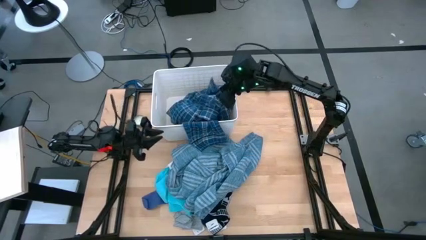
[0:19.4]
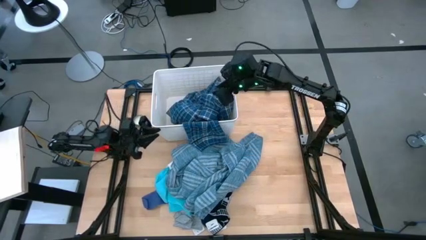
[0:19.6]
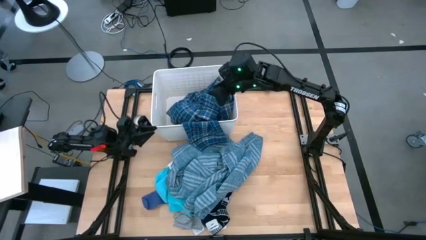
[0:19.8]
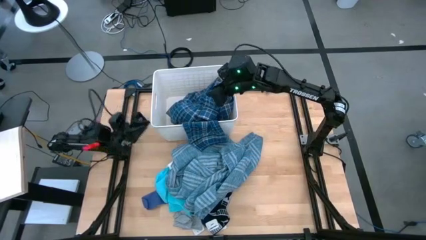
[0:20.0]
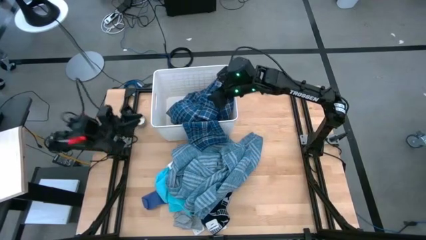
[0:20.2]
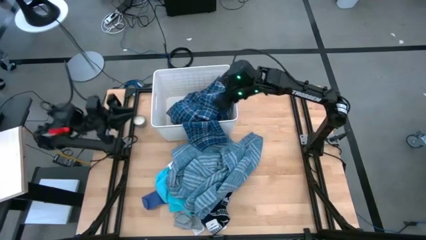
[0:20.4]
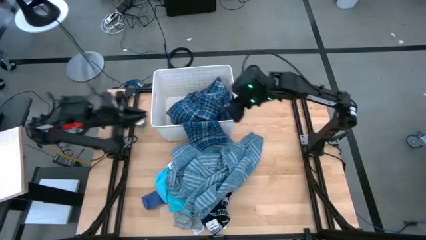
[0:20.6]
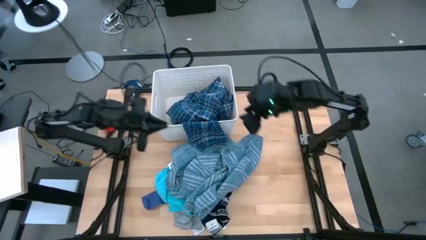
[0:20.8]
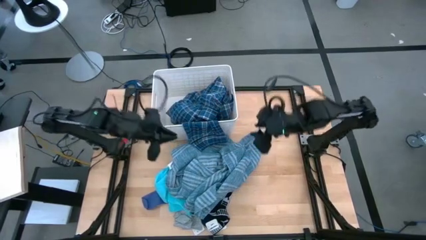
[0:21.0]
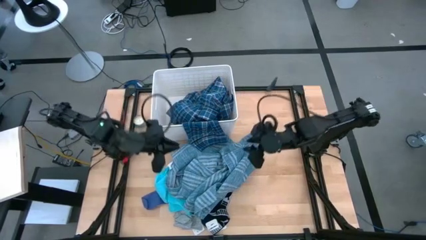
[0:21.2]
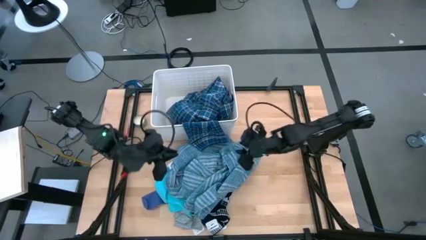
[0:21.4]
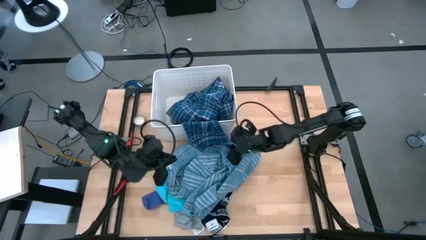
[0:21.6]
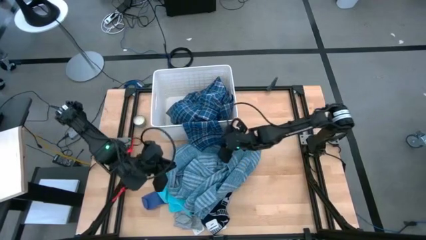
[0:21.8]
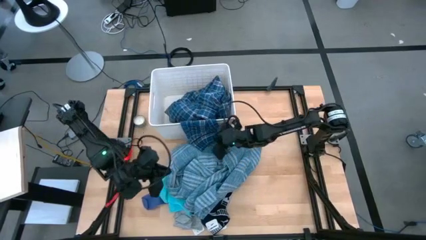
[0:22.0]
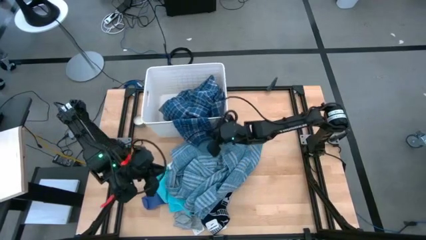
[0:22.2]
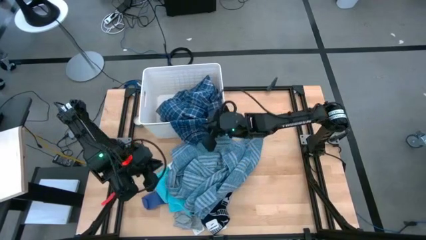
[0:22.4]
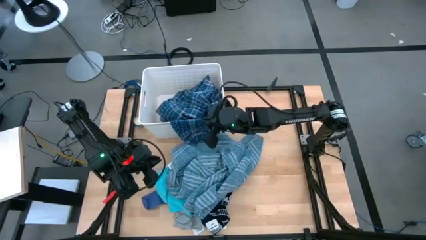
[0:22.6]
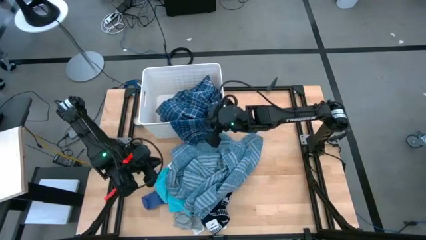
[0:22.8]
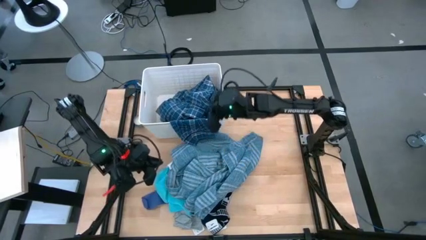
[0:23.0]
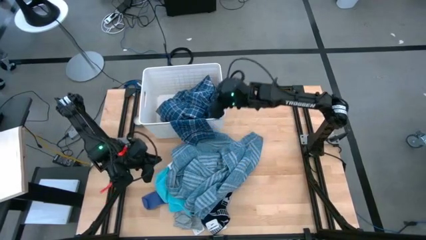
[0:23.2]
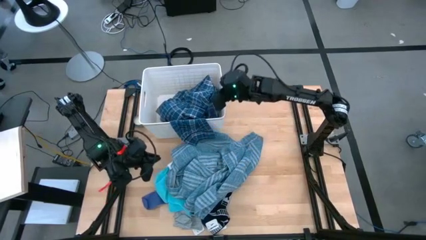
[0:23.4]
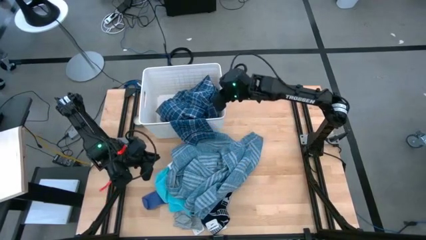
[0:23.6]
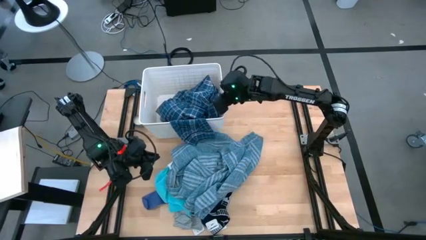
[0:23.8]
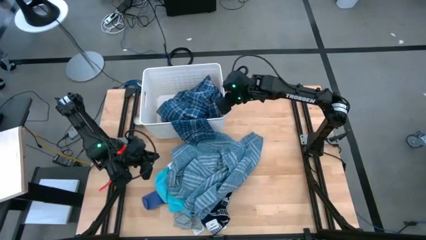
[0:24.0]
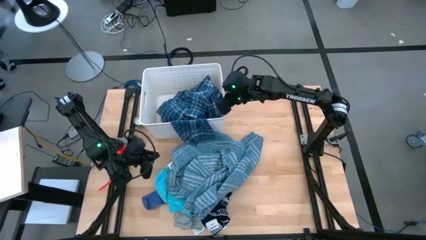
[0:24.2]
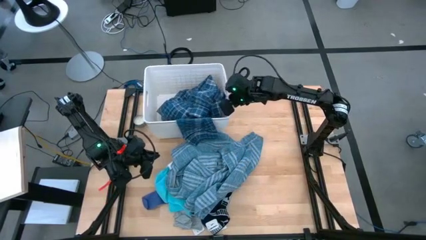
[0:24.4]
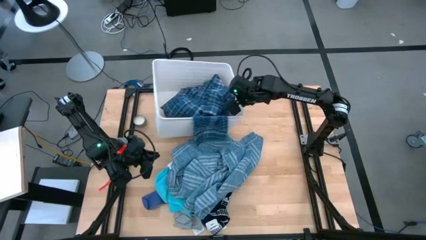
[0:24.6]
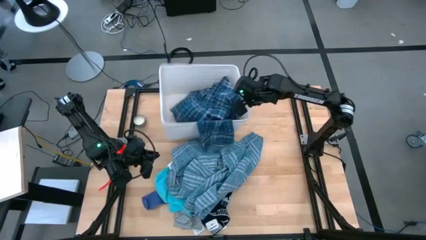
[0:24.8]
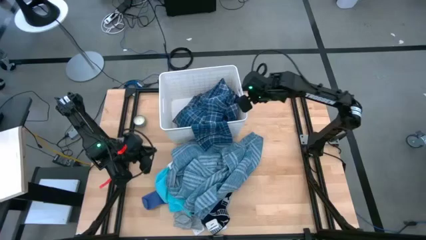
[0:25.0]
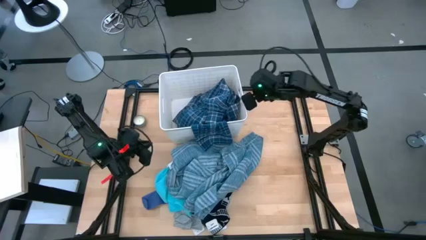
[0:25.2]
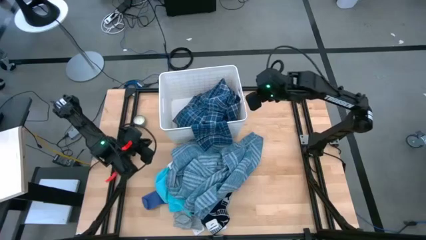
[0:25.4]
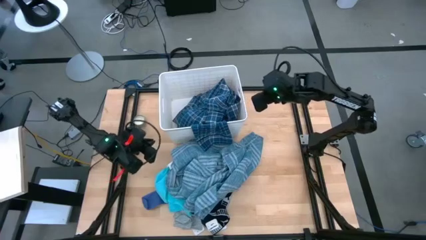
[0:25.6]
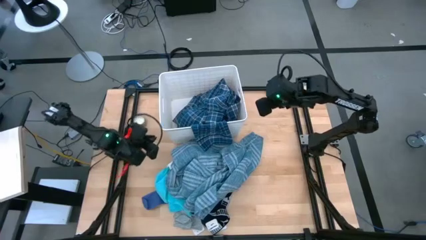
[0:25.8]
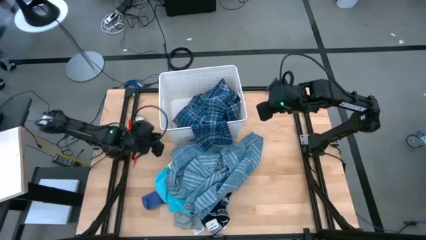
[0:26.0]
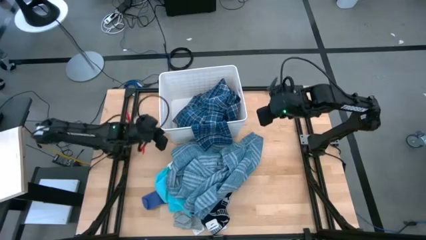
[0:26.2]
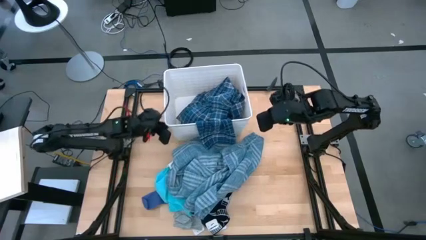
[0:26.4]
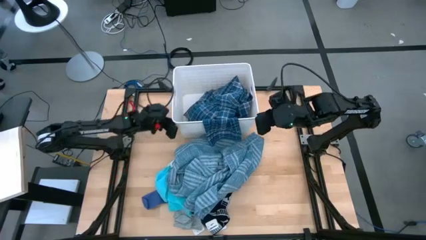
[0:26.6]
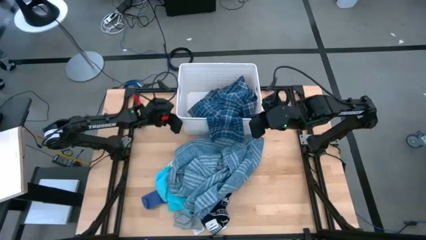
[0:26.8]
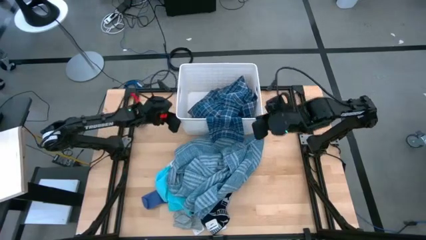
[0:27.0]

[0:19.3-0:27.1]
Task: Sort clothes
Move the bin to the center of the table

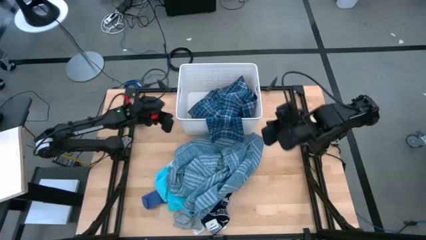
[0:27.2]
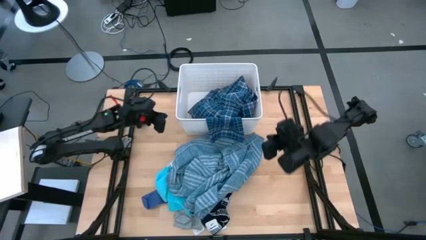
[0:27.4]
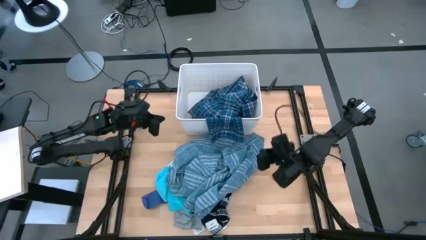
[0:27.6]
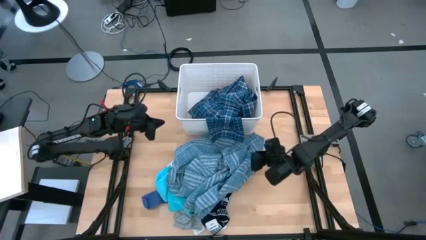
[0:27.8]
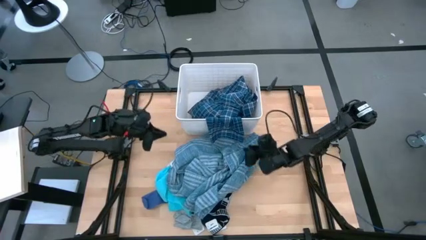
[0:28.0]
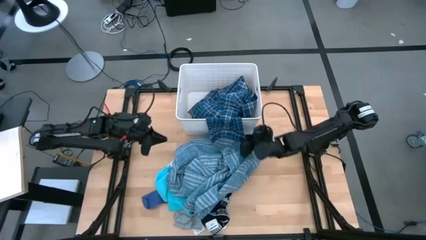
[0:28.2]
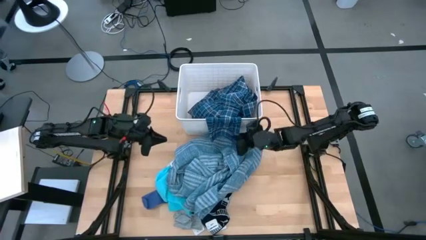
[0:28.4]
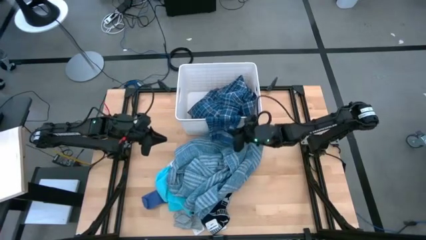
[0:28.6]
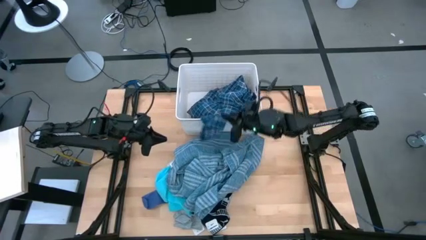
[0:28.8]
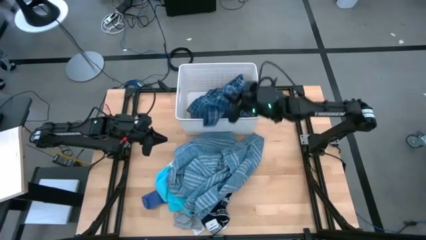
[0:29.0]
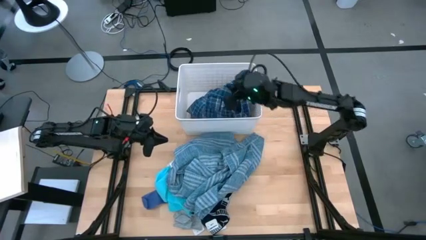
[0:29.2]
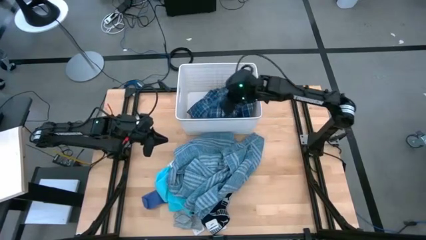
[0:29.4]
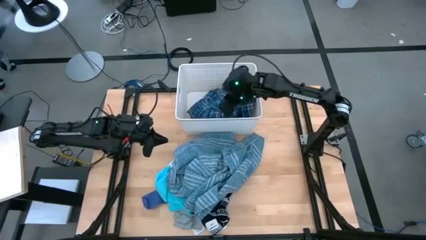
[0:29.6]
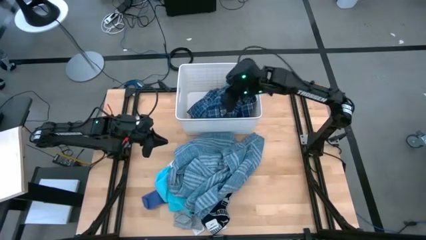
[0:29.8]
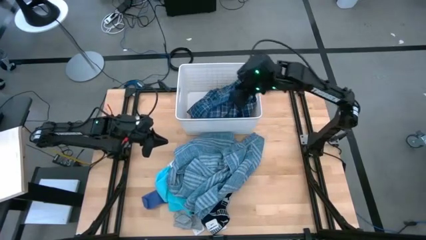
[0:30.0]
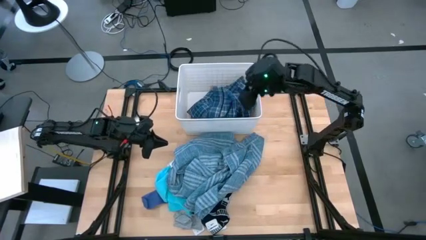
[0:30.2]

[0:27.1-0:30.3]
Put the checkered dark blue long sleeve shirt into the white bin

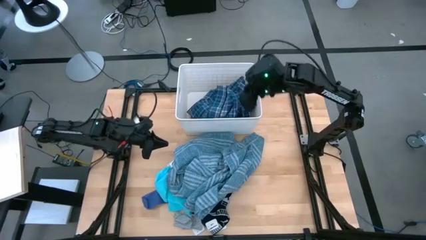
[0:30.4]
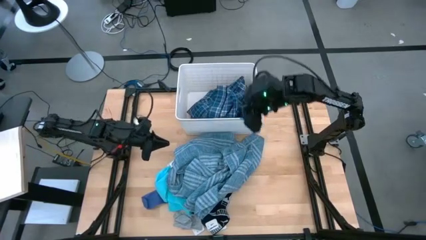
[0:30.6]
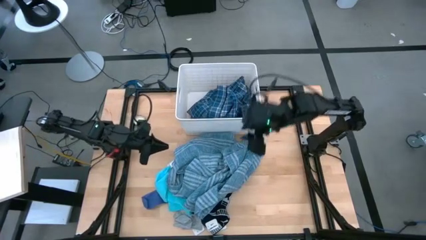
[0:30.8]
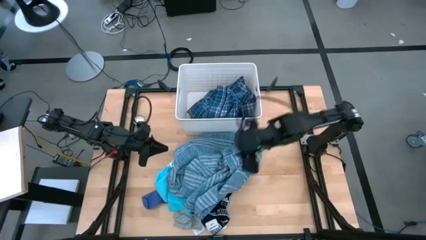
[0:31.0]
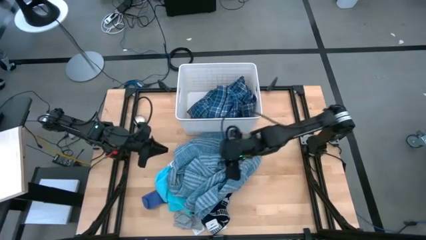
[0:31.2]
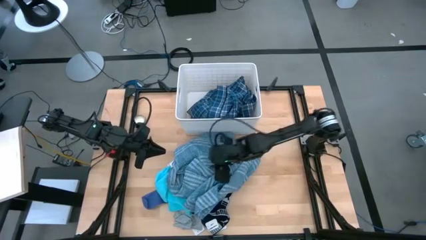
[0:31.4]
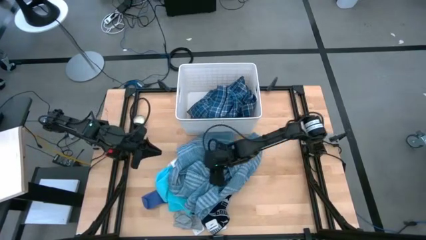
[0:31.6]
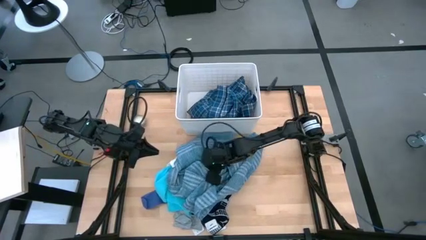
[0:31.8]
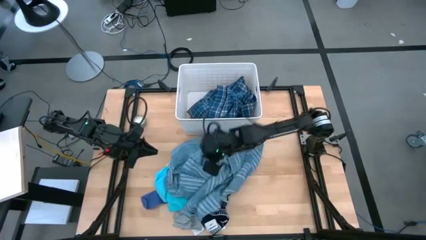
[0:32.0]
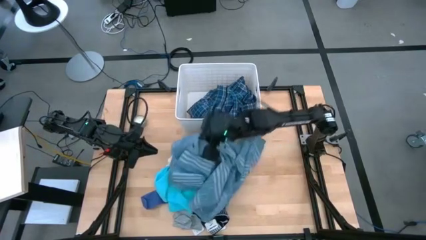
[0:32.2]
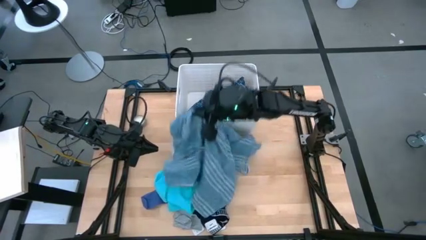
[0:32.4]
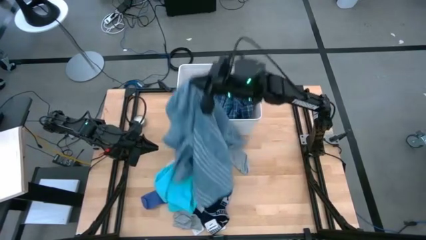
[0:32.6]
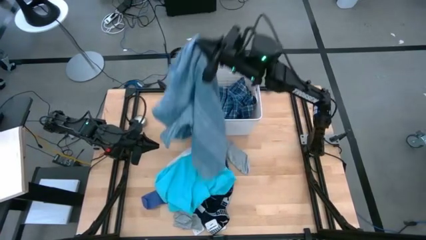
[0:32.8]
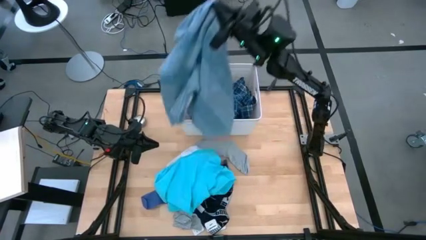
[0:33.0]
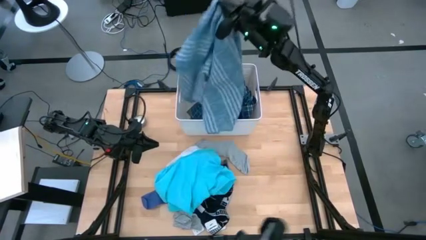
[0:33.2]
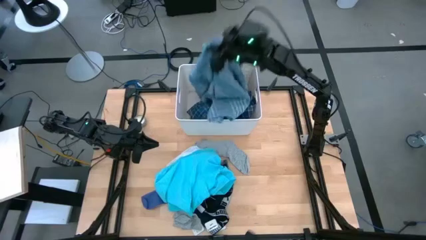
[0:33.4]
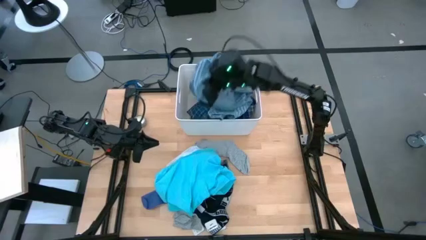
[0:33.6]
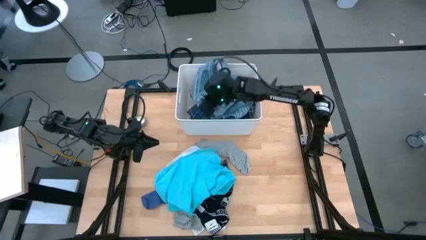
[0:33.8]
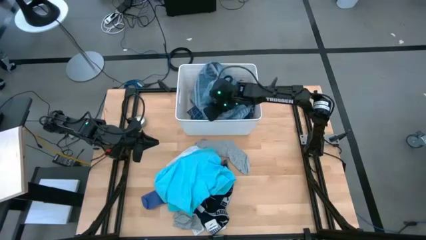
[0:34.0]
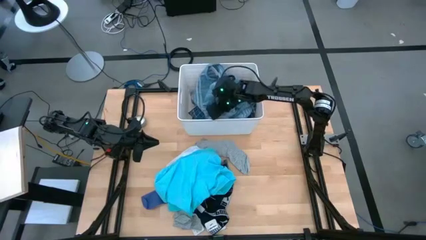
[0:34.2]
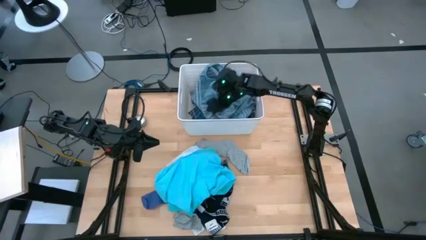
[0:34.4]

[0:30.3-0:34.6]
Put the checkered blue shirt into the bin

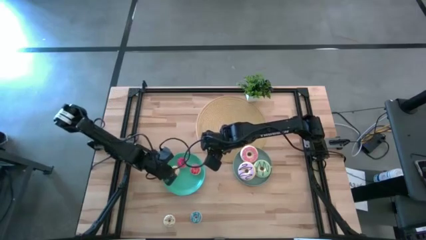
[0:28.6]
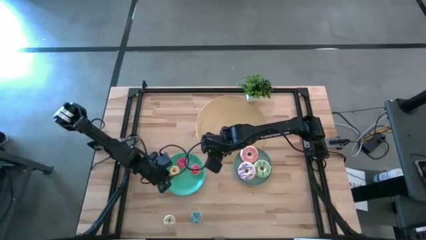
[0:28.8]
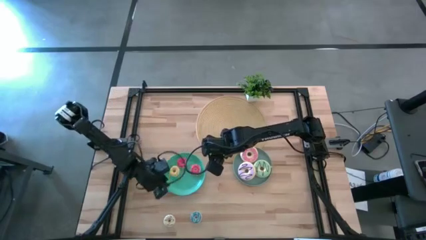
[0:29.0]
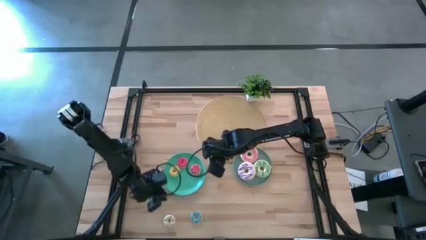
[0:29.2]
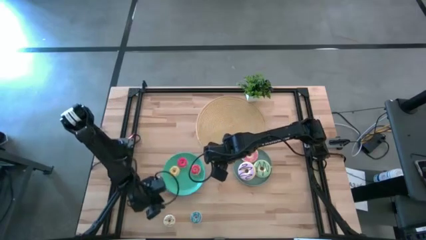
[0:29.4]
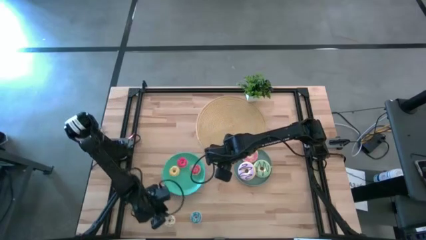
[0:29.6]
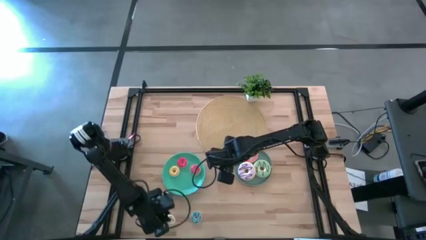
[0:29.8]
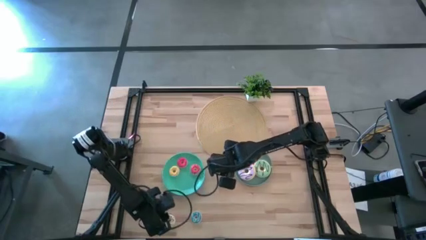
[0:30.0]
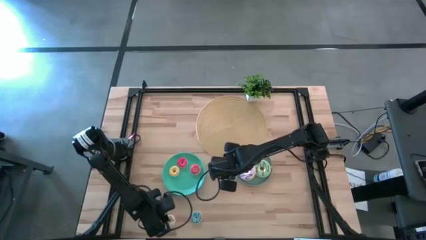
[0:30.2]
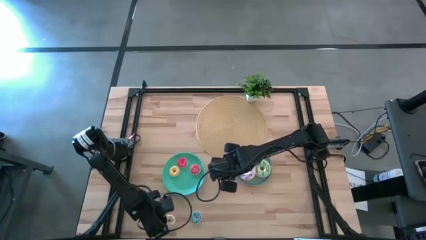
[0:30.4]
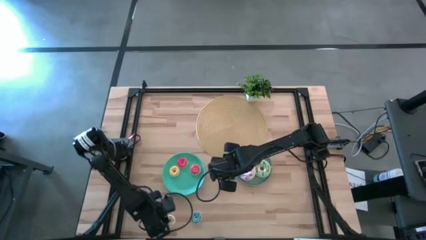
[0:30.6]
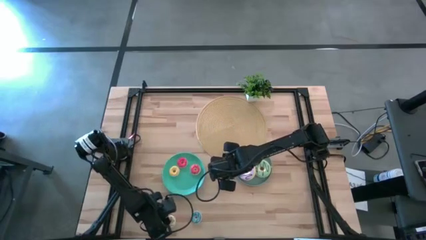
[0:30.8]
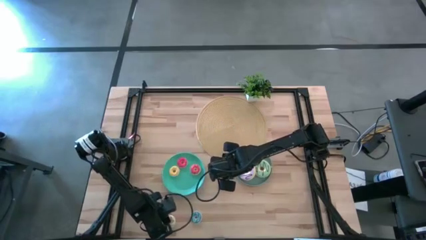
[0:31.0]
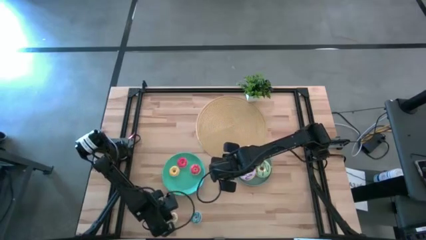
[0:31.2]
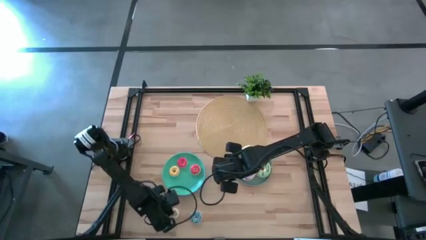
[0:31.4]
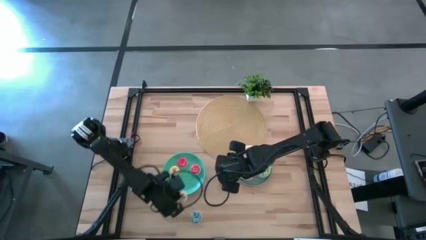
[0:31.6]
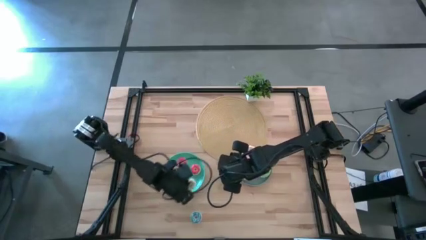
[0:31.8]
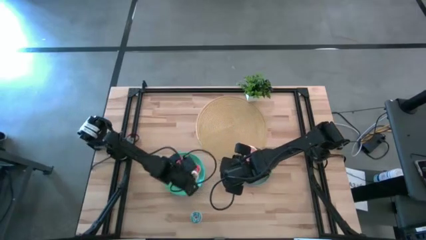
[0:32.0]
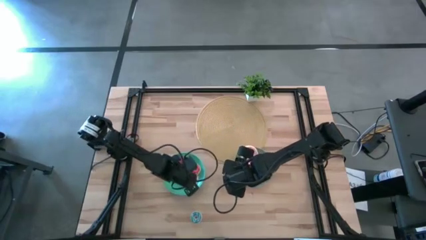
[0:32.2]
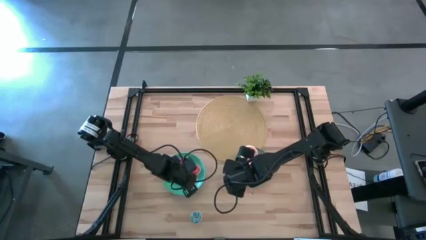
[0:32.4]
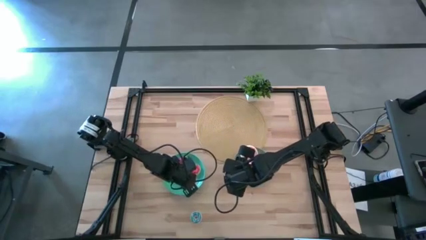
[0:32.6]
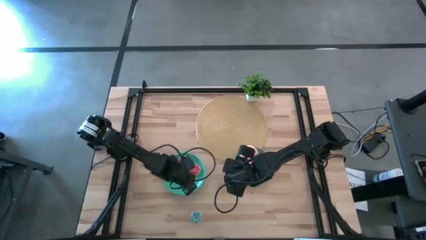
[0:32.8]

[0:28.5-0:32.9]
Task: Pick & Place donuts
Put the small white donut on the light green plate
